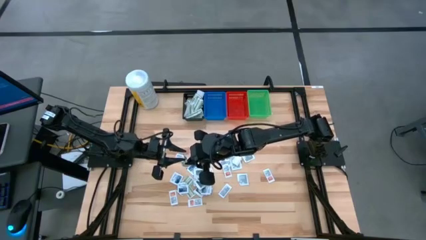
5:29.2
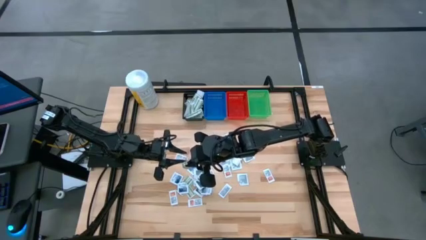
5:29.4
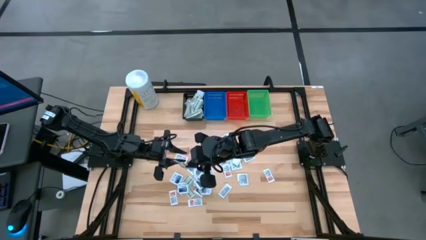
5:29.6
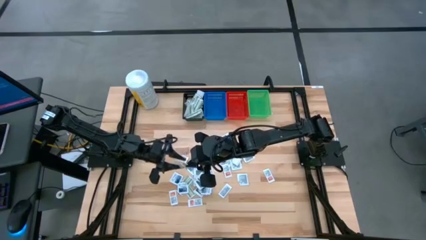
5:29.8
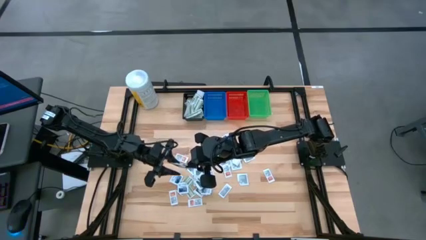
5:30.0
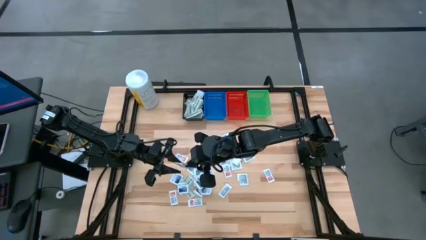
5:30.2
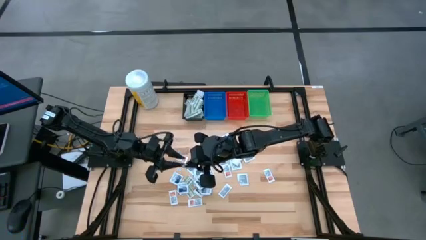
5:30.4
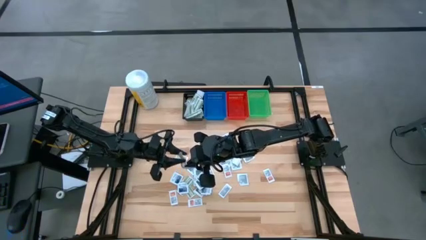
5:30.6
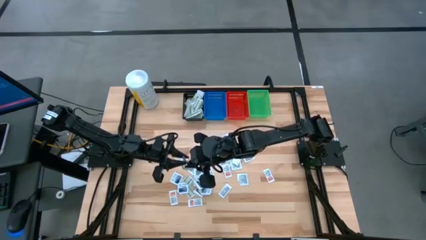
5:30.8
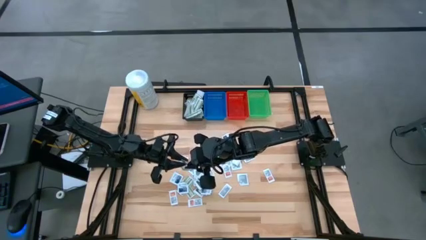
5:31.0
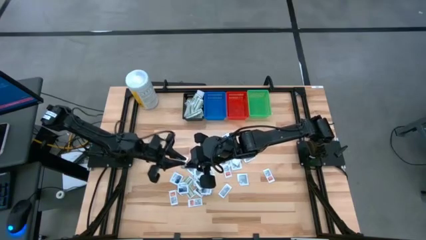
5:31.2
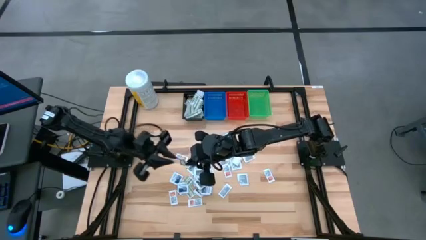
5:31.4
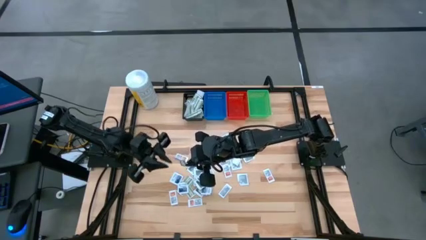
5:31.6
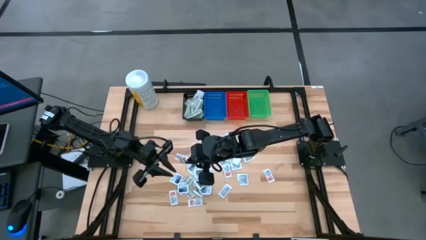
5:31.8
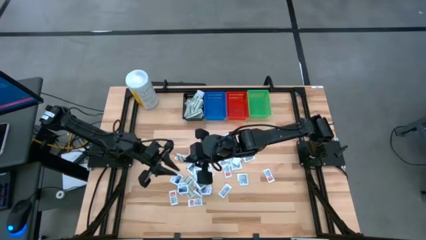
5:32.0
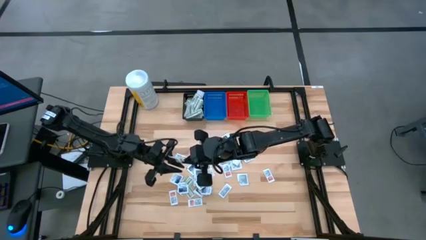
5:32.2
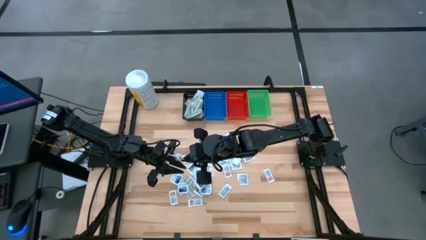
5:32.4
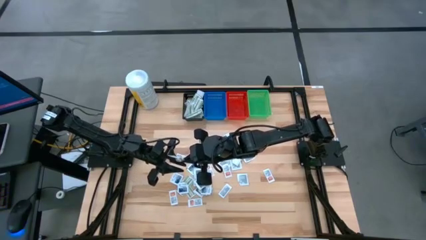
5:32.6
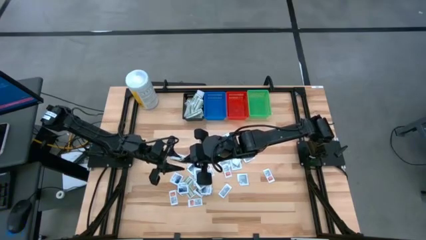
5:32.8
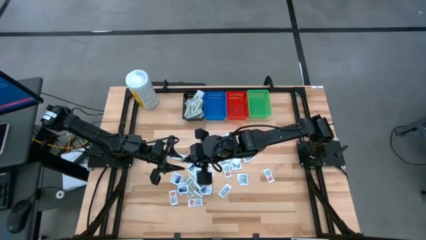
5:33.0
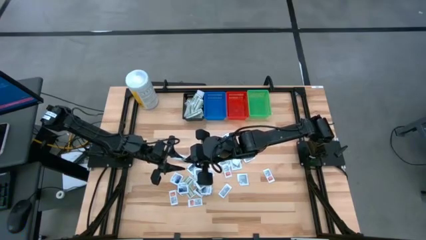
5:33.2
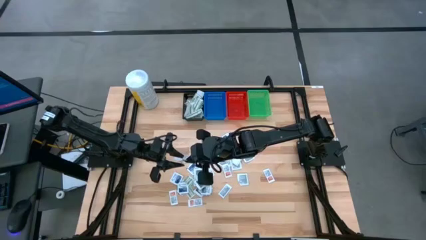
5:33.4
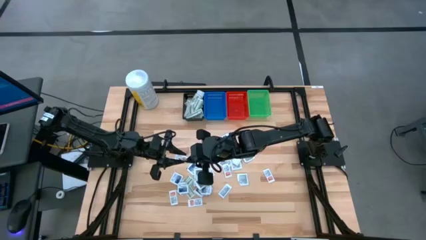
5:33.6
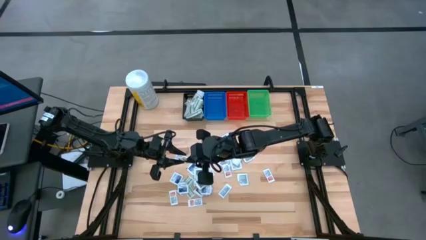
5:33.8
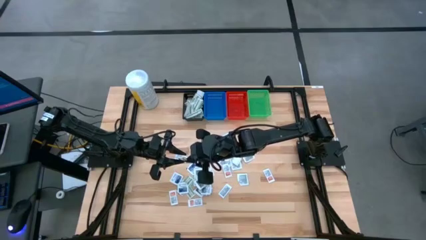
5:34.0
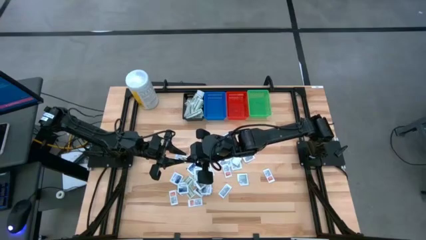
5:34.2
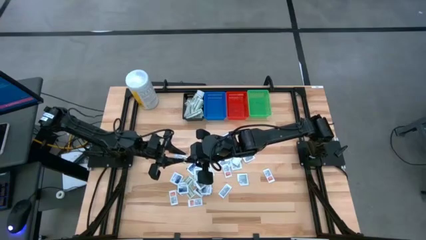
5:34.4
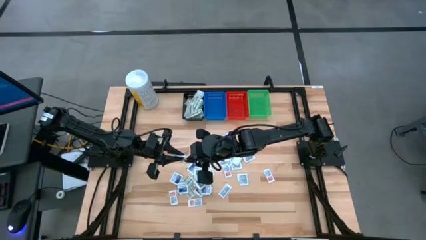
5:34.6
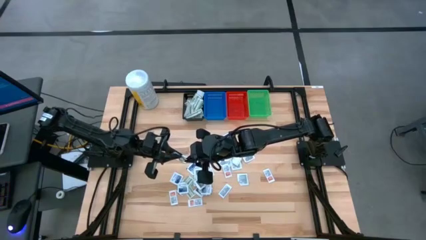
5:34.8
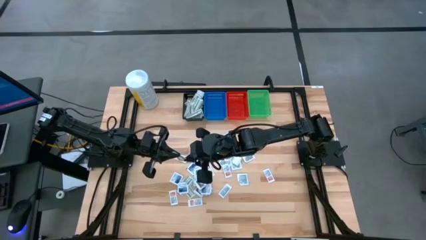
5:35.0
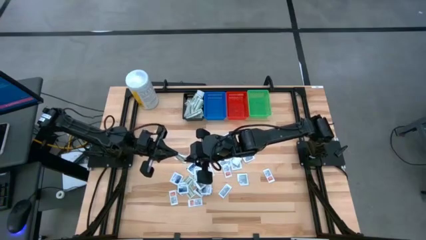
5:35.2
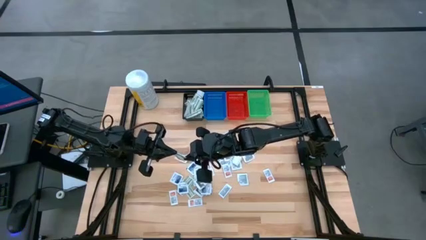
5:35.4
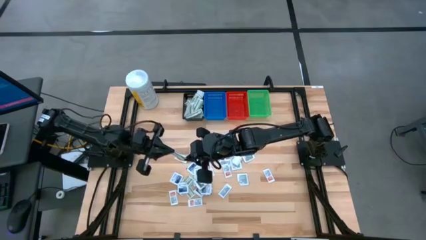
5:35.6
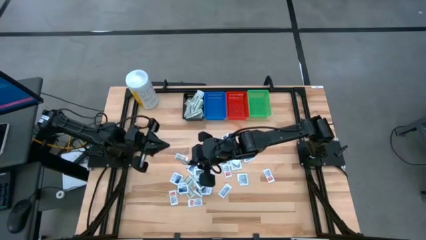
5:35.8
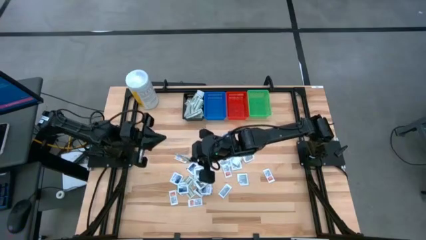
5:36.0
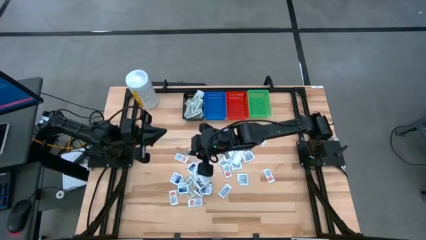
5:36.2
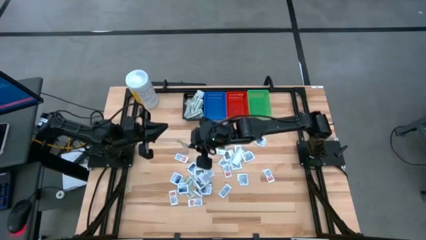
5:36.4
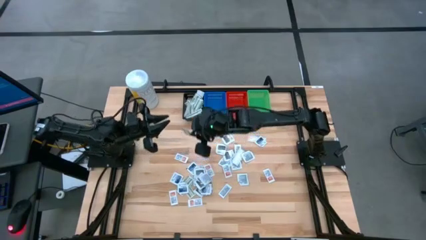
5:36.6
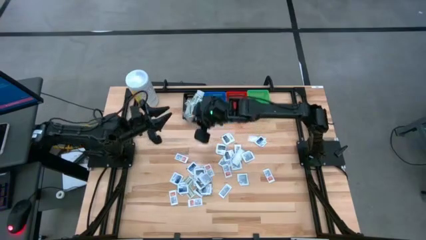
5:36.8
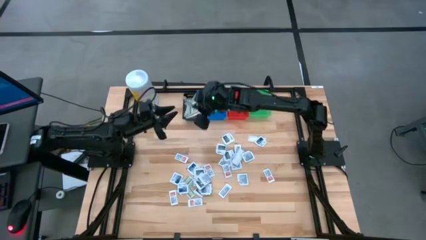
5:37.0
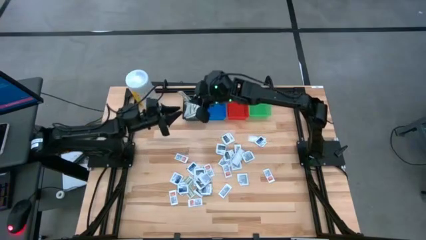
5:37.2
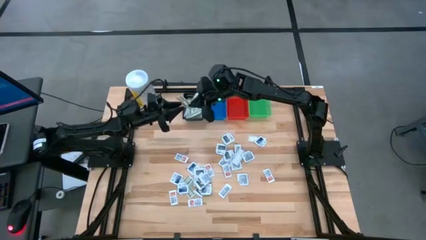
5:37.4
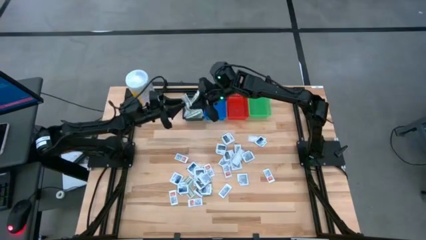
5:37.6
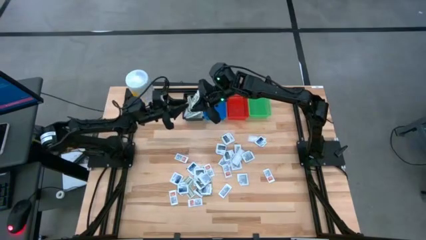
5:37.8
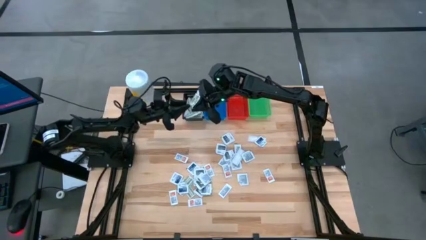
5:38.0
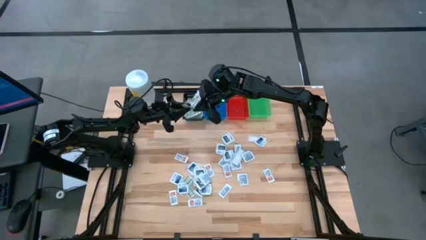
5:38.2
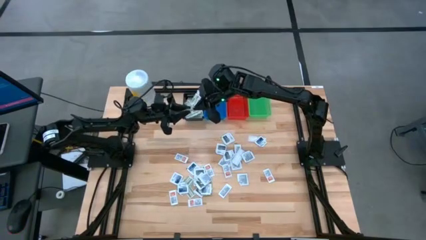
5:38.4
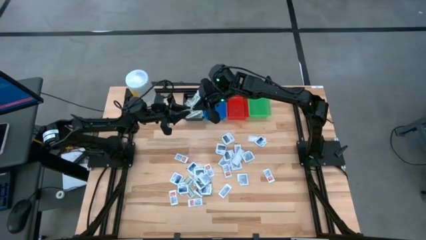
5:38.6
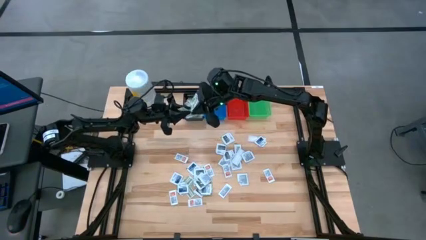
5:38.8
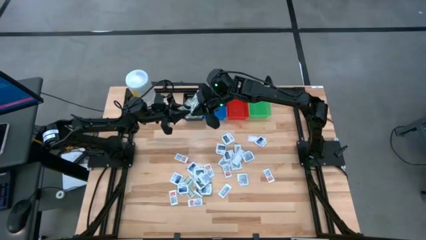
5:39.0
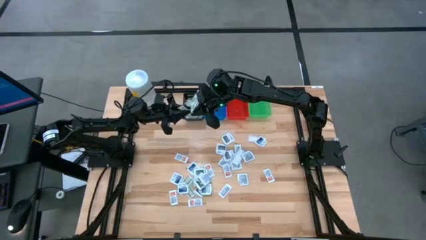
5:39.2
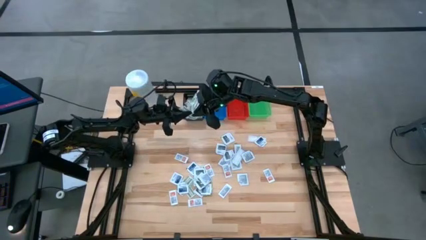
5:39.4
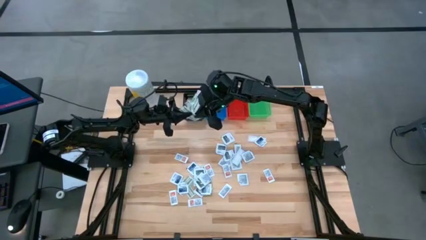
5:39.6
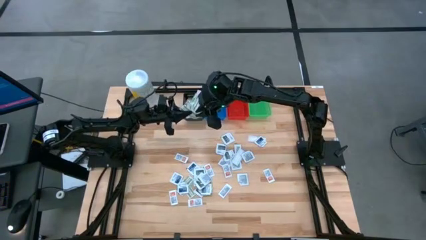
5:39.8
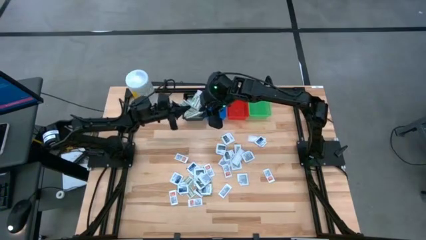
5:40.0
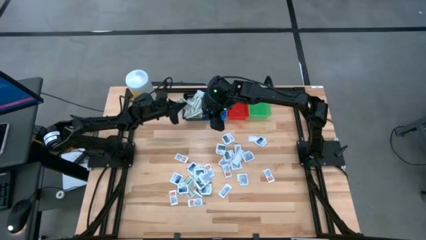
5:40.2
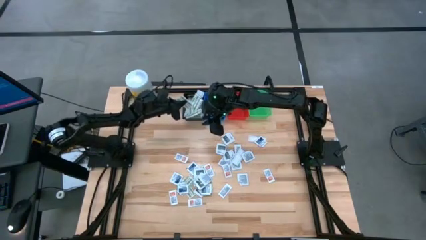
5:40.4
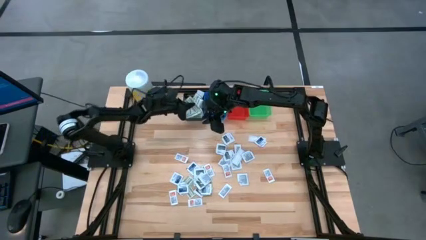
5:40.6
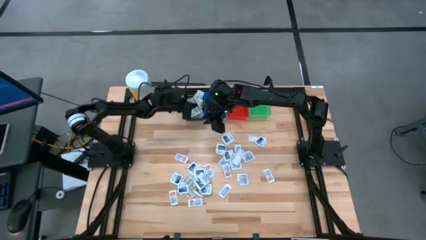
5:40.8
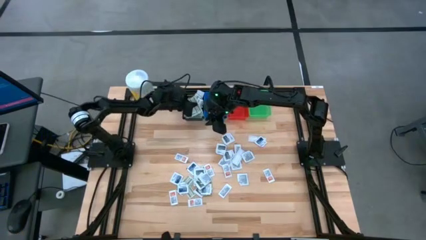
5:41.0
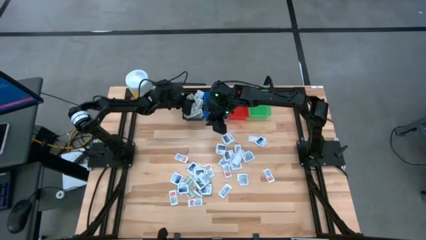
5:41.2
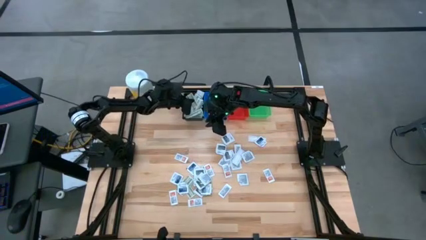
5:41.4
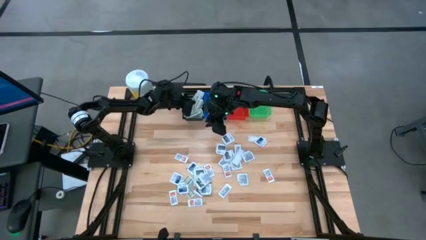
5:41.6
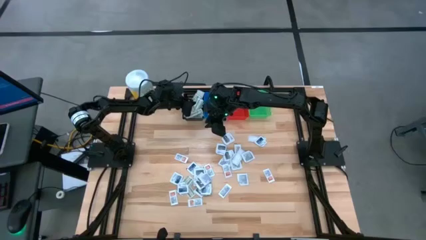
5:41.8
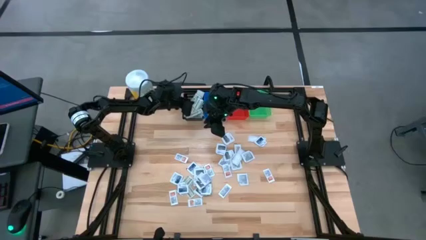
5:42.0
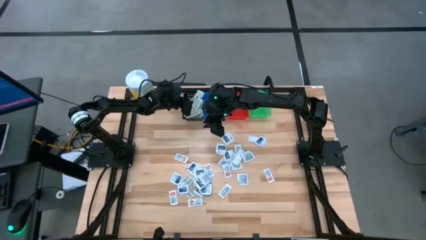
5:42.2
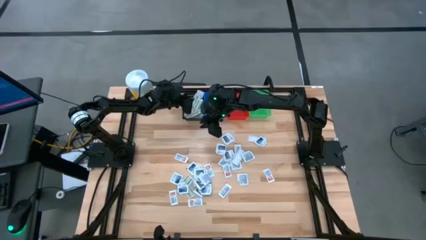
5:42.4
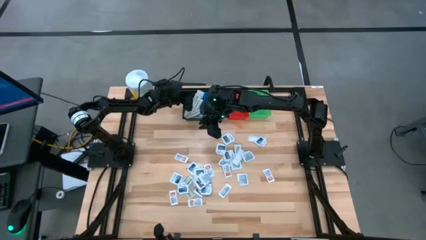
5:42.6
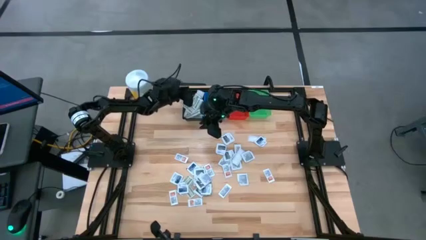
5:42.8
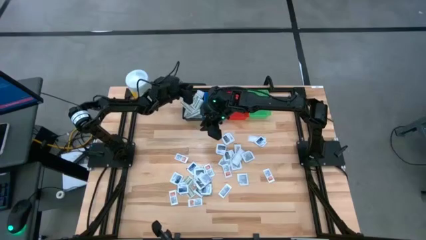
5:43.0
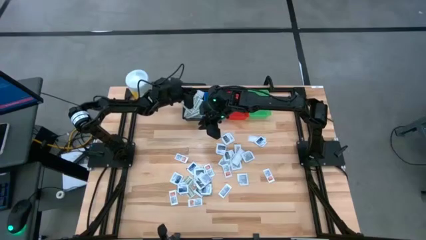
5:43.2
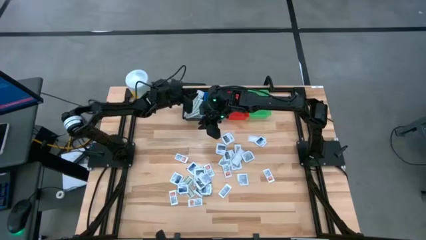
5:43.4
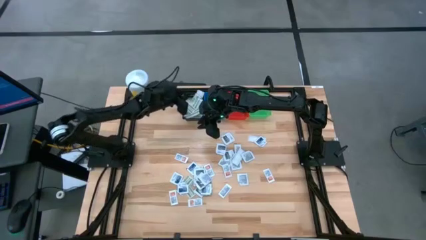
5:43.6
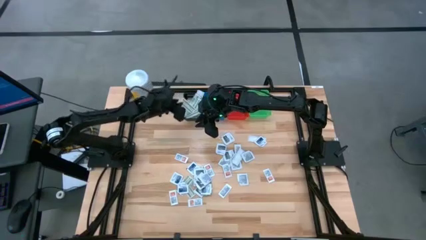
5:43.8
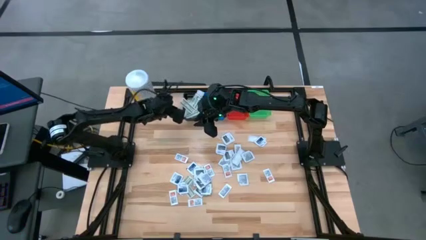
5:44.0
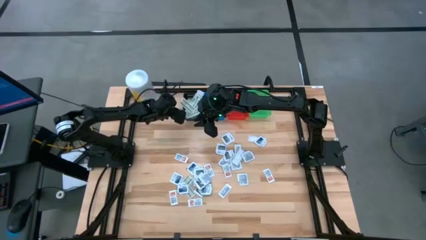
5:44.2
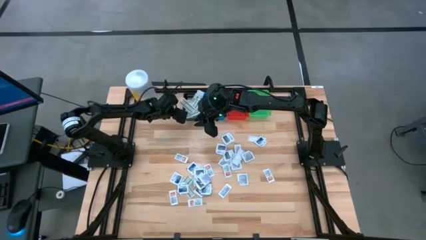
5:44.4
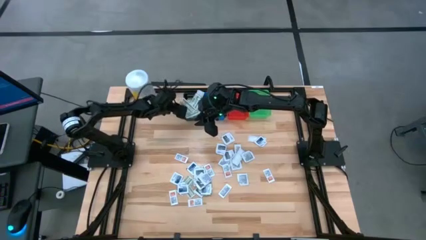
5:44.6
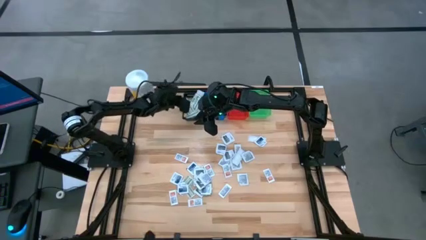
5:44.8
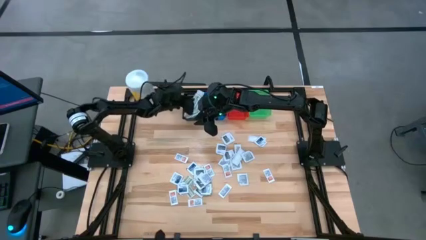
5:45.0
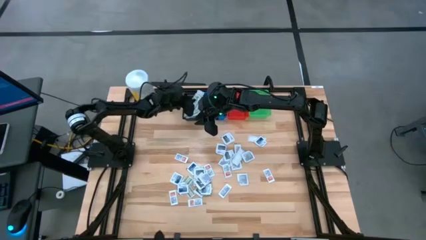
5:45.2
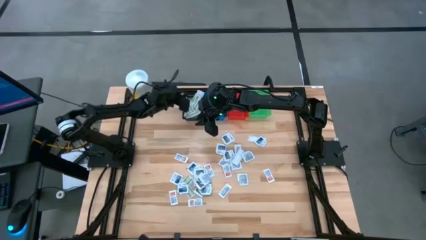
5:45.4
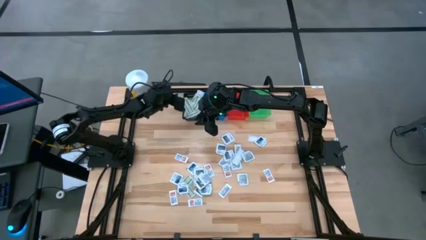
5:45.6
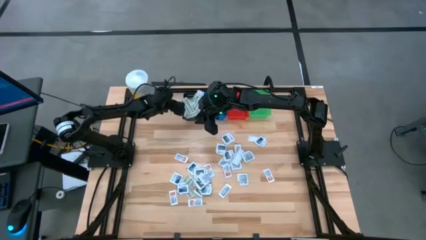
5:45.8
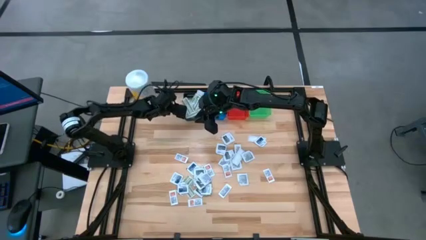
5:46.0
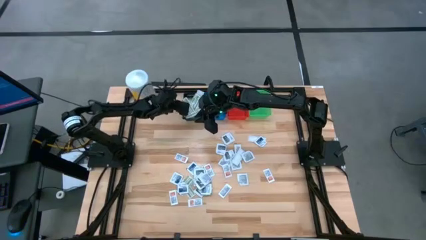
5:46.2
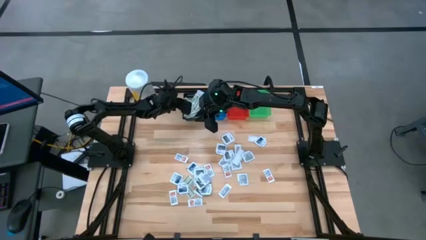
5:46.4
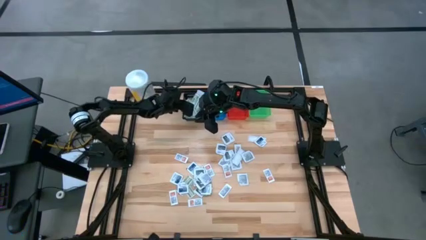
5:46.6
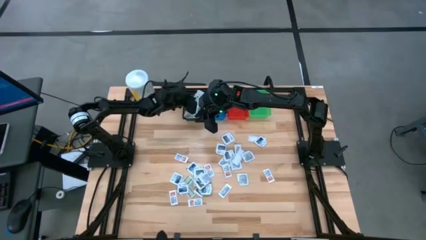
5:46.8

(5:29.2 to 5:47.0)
Task: Pick & Place First Aid Supplies
Put the green bandage pack in the black bin
